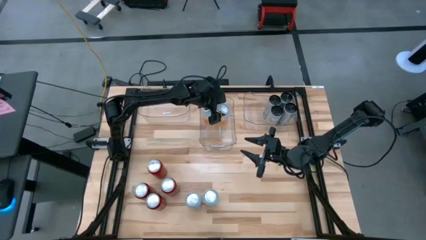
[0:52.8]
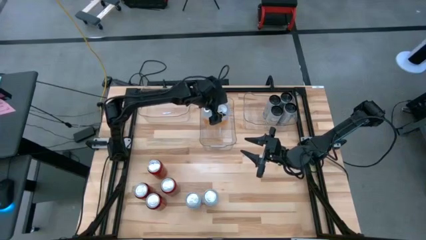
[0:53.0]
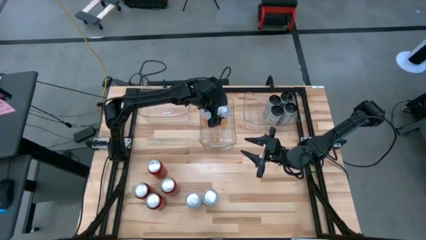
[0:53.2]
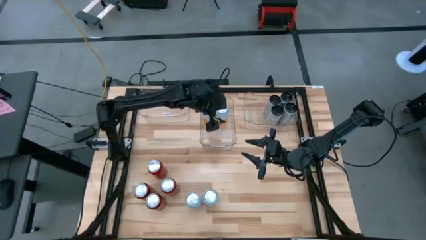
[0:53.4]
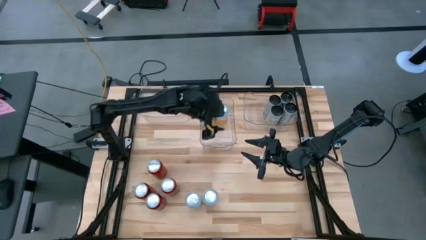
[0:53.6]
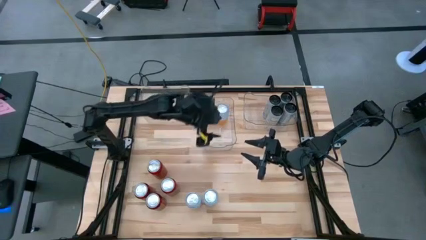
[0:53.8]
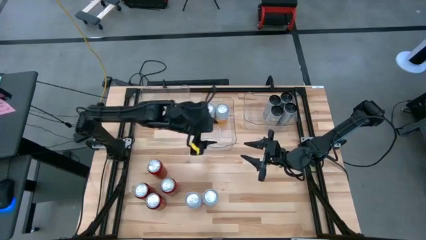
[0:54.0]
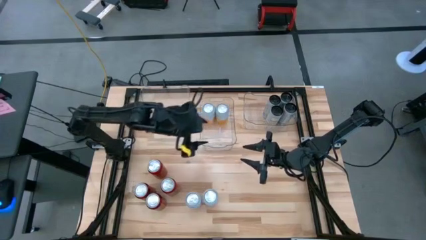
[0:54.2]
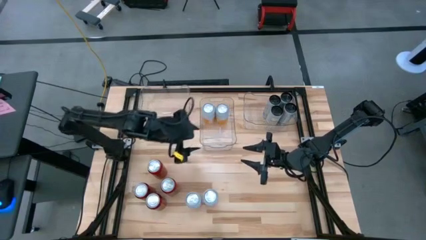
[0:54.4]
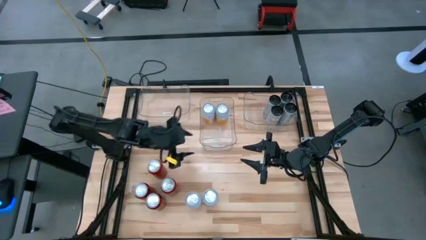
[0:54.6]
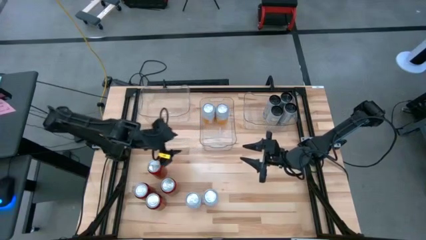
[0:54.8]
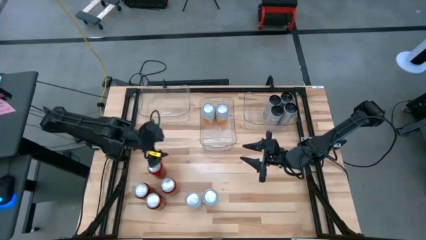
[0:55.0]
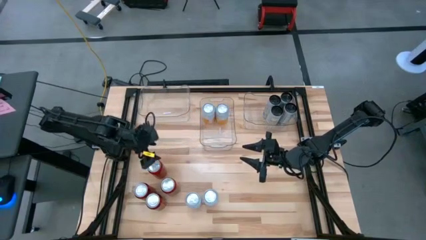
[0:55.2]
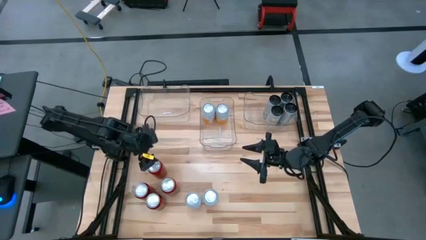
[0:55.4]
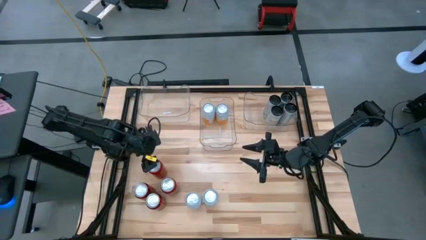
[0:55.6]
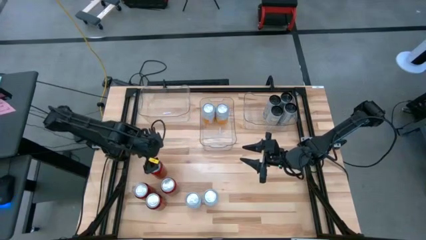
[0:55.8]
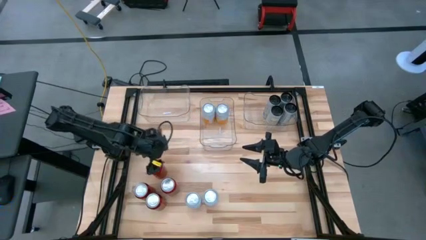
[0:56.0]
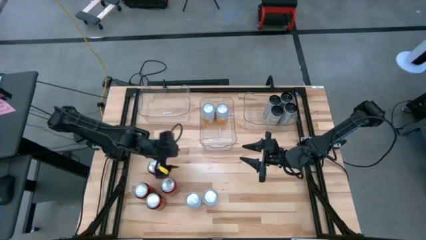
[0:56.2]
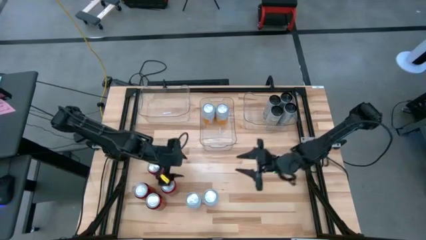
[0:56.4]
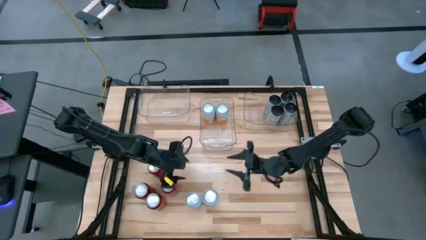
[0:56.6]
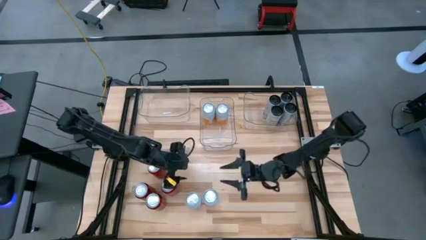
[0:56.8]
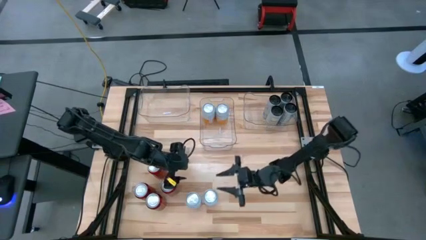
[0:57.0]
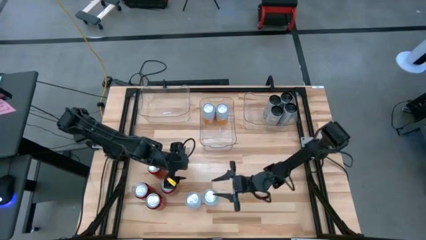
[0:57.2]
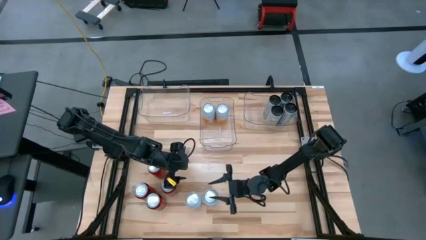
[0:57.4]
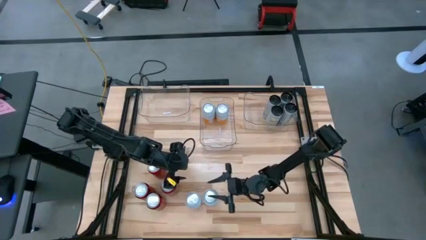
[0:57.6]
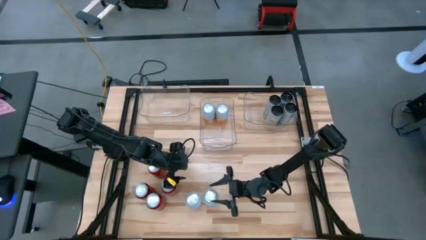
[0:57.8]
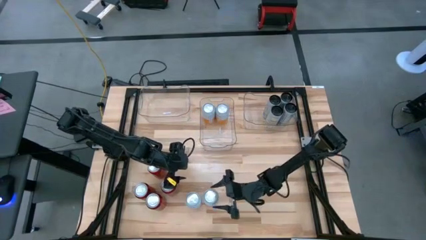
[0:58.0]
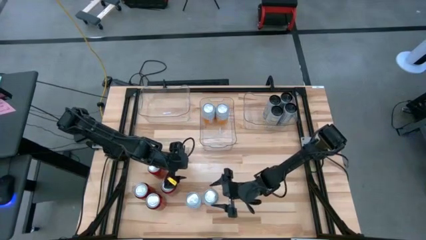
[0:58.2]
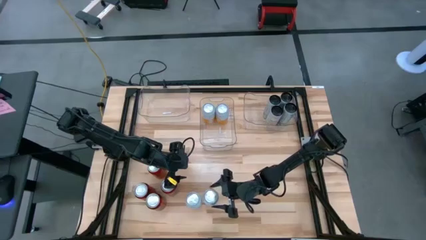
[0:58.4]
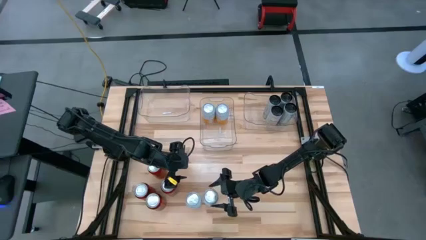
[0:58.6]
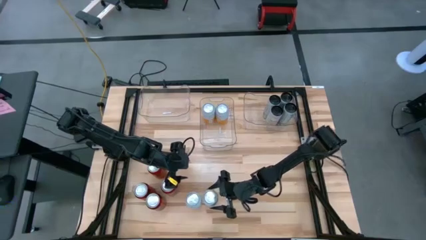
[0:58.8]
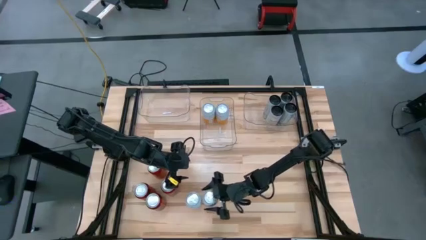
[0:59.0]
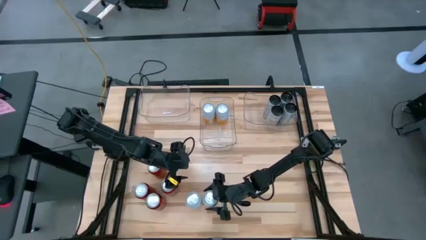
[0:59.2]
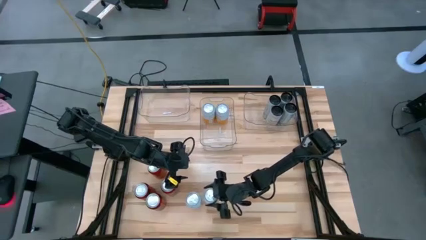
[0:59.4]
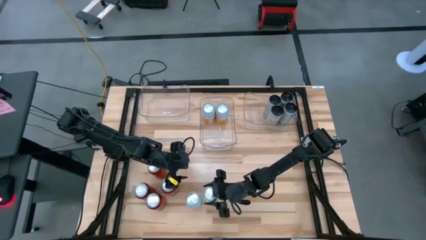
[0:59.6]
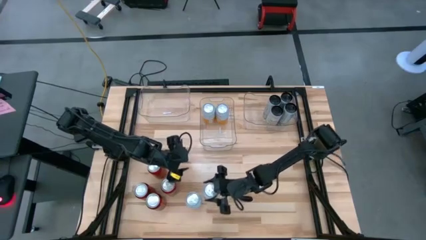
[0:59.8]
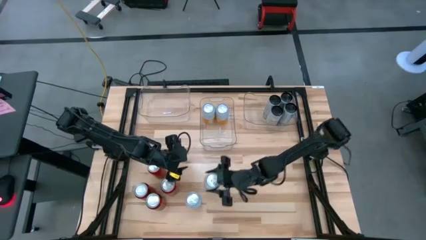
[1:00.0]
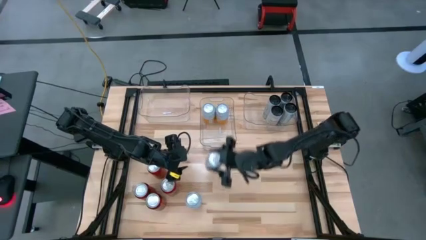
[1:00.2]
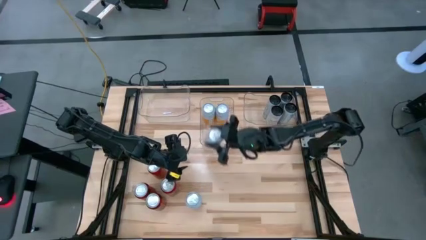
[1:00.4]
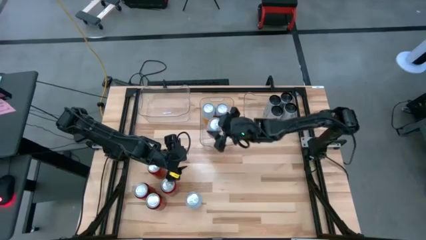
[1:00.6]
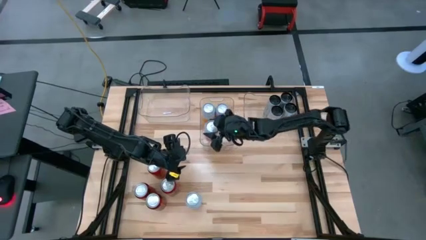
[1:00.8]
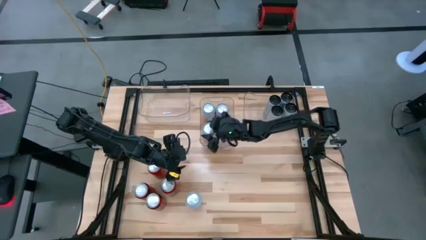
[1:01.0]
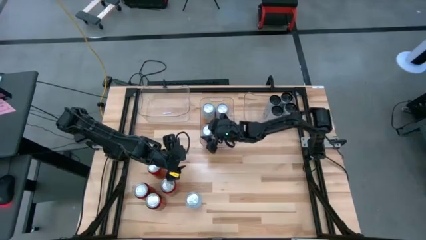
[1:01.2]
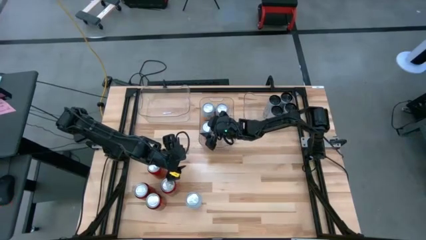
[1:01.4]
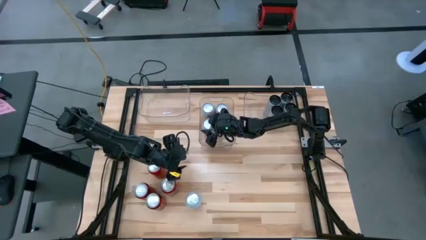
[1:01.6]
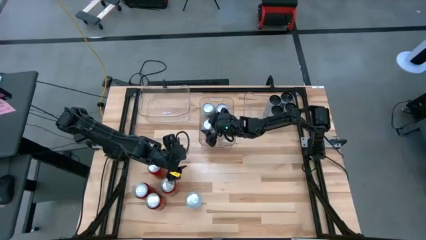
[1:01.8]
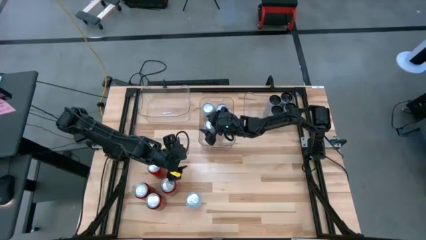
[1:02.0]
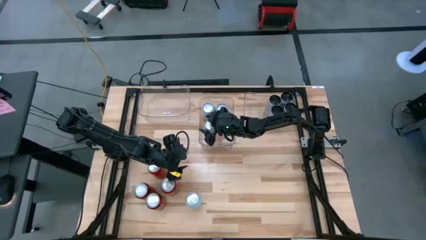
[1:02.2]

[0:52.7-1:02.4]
Task: Sort soda cans
Put the right orange and white soda can in the middle transparent bin

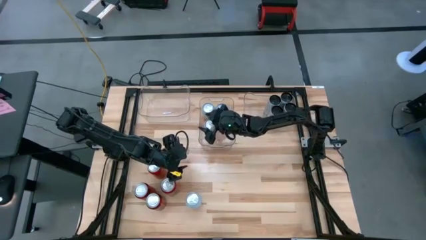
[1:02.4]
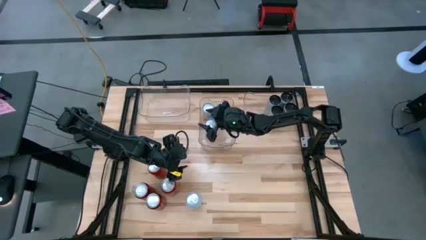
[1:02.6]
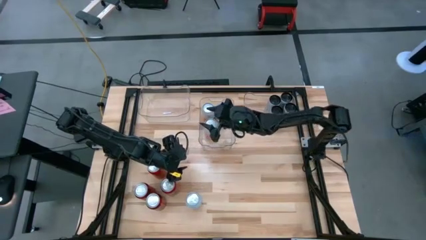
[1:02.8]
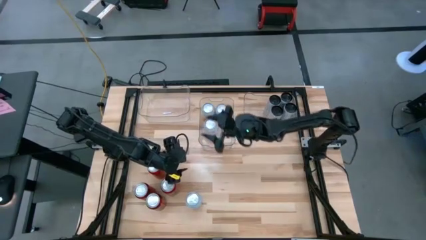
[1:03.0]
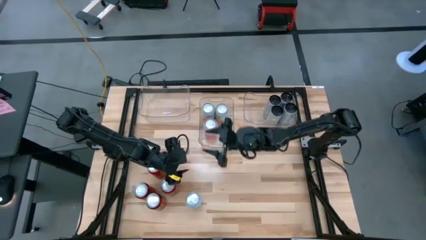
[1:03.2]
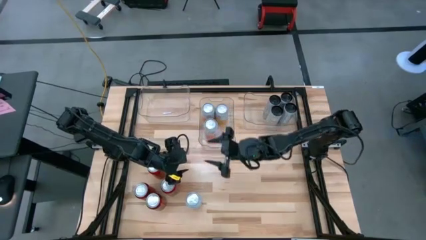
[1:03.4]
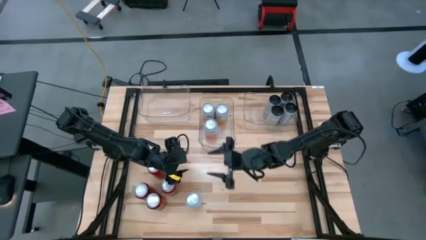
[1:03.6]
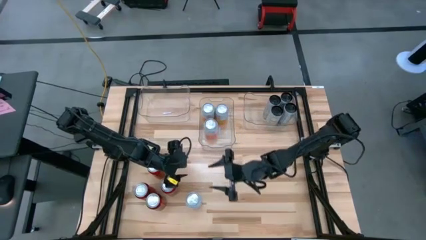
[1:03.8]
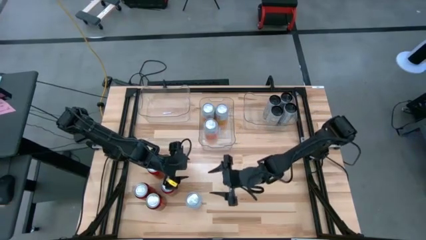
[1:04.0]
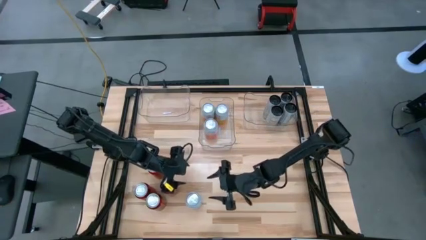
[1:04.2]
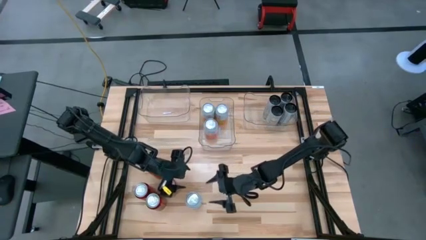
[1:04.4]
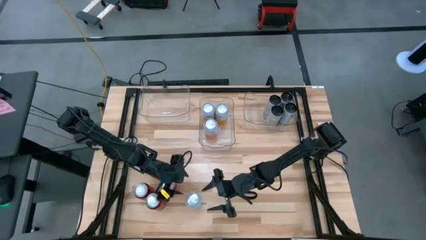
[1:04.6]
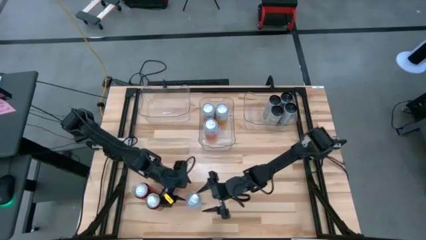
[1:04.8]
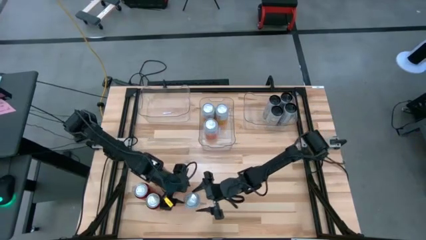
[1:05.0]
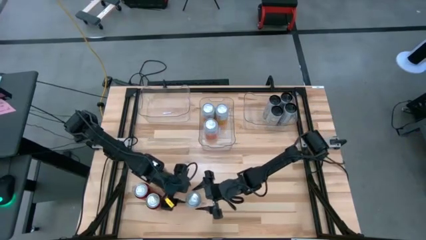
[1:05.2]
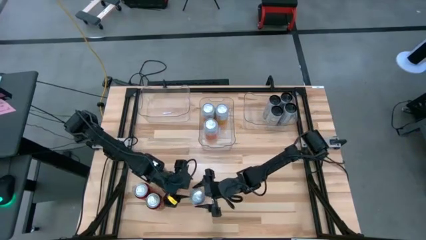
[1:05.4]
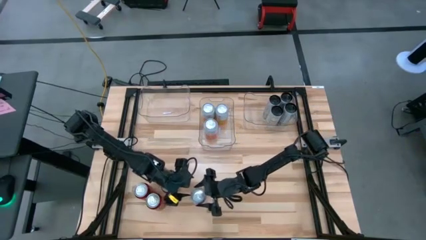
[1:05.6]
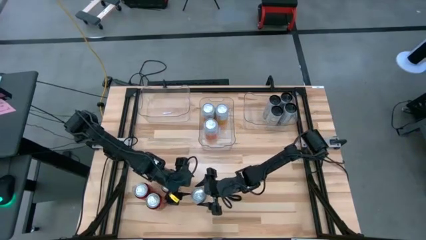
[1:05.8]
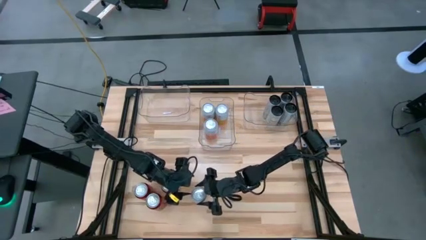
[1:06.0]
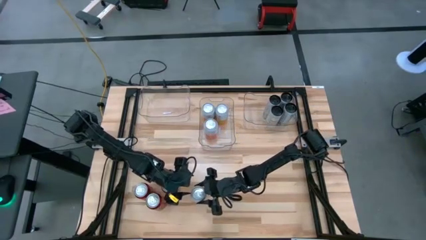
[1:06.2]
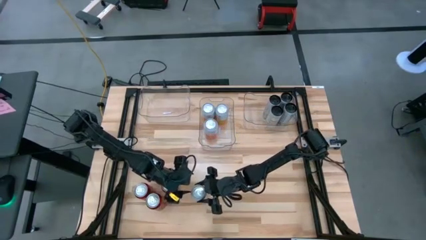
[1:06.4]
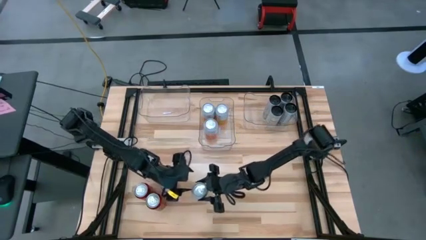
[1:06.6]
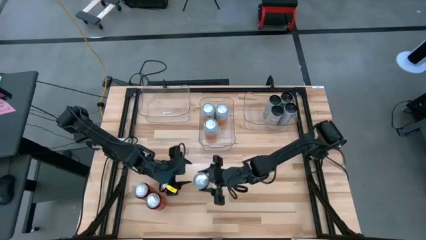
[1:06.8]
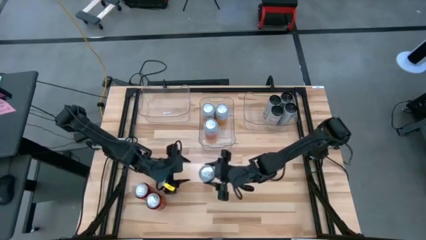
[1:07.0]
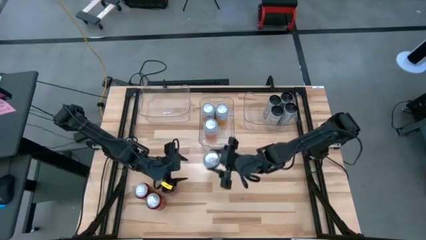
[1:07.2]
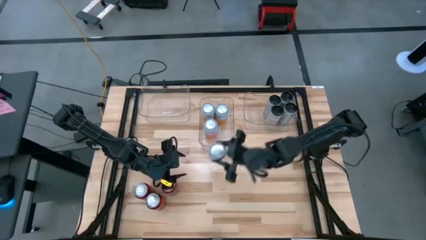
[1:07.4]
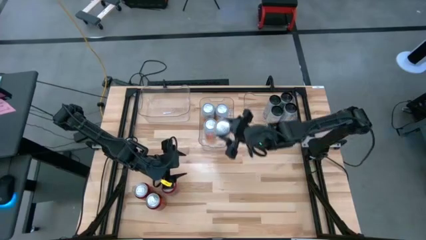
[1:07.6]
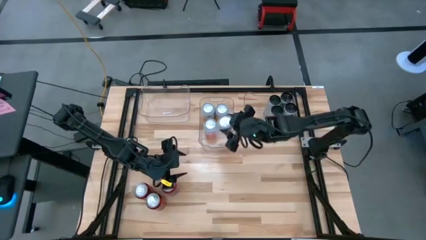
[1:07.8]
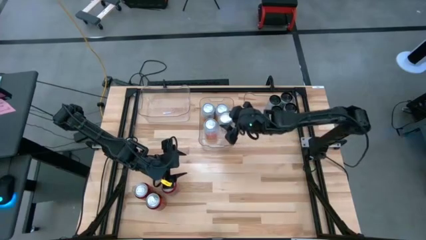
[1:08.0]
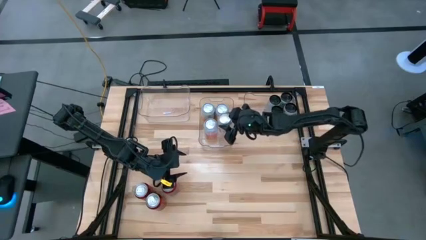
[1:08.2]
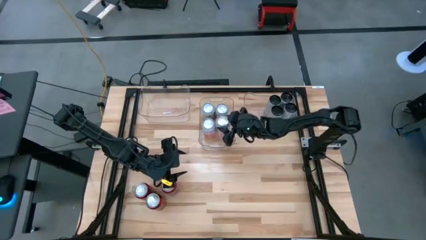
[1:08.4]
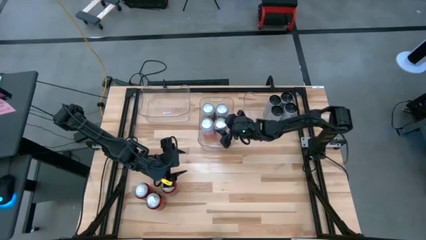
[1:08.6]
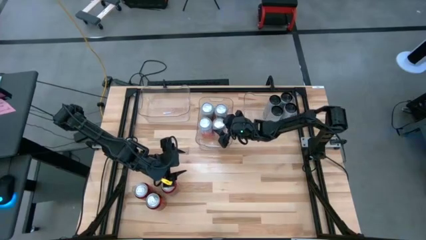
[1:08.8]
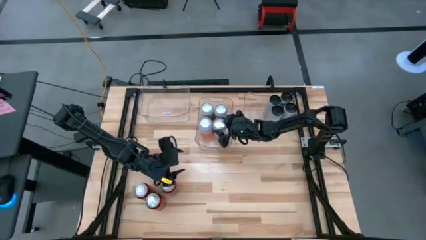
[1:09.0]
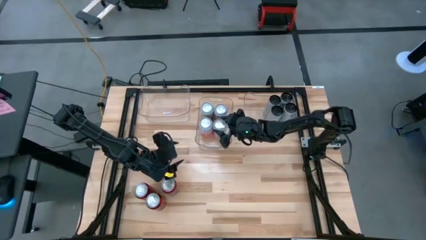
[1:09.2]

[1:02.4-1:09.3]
Put the orange and white soda can in the middle transparent bin
